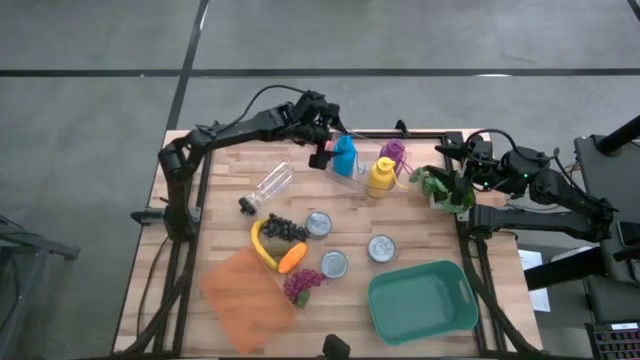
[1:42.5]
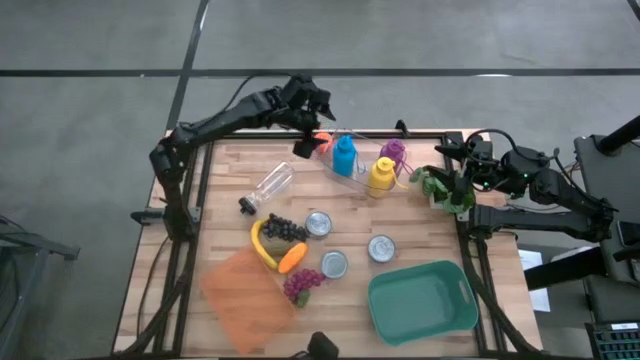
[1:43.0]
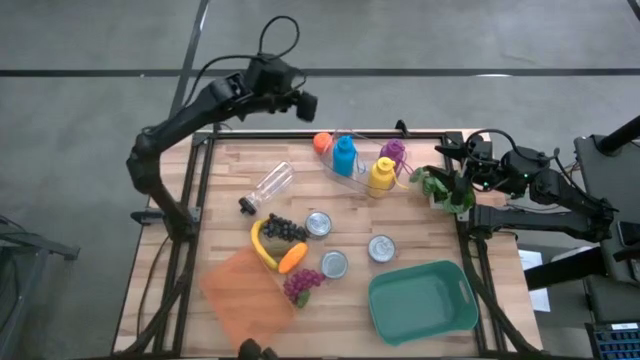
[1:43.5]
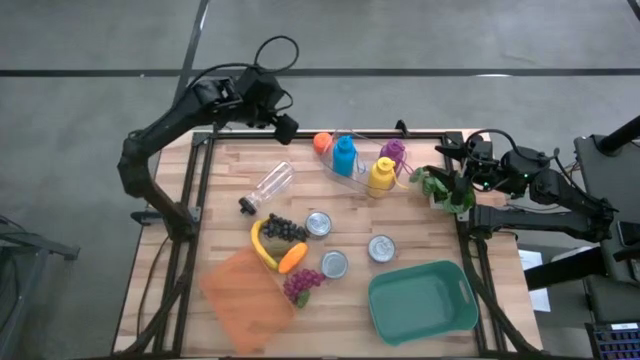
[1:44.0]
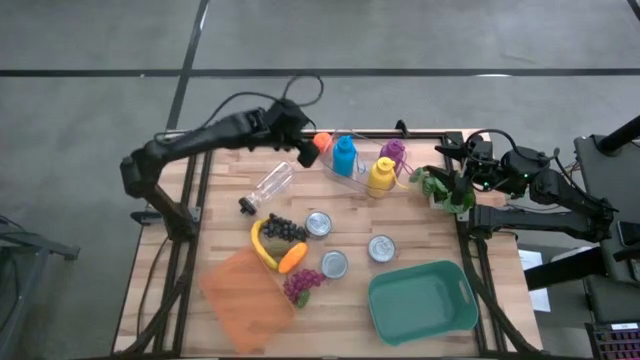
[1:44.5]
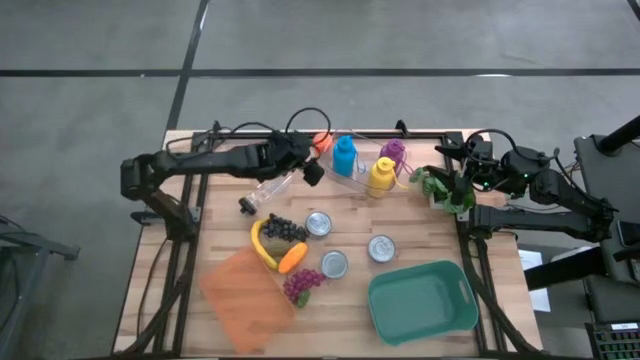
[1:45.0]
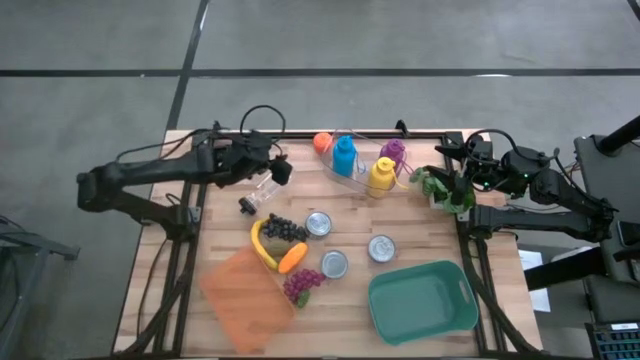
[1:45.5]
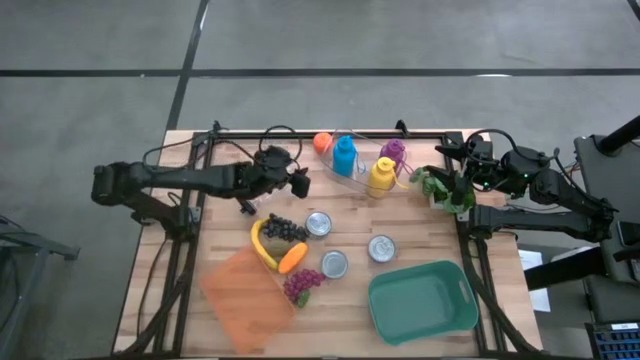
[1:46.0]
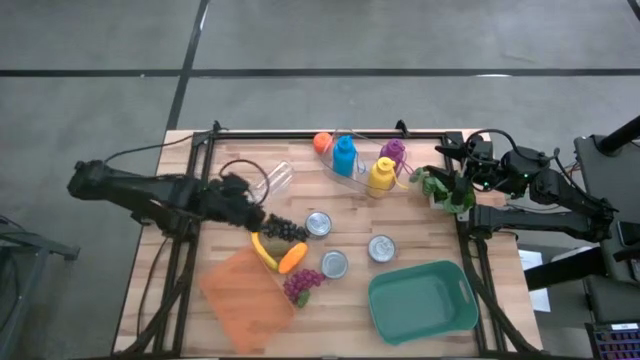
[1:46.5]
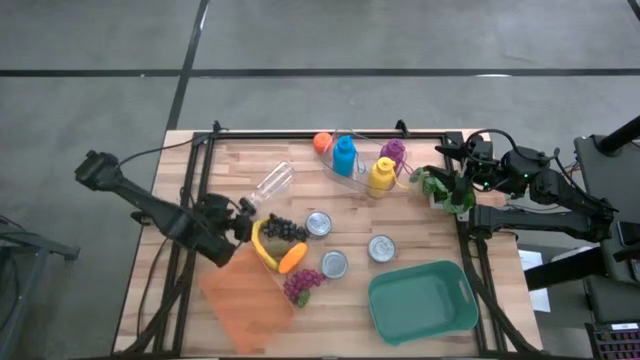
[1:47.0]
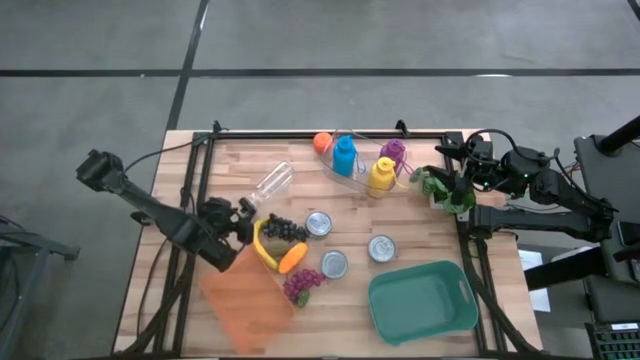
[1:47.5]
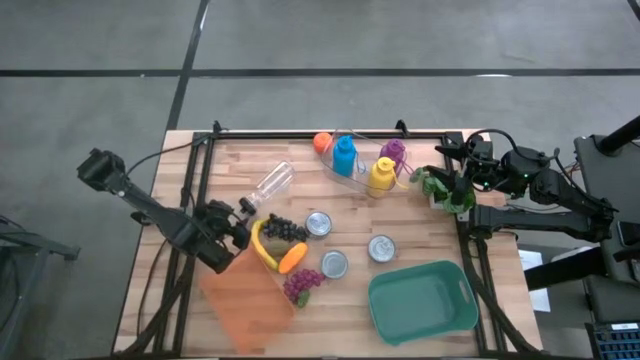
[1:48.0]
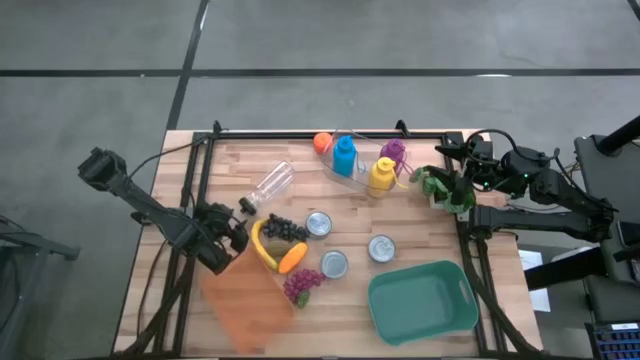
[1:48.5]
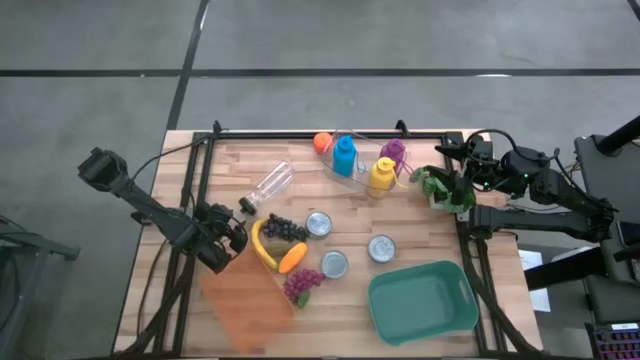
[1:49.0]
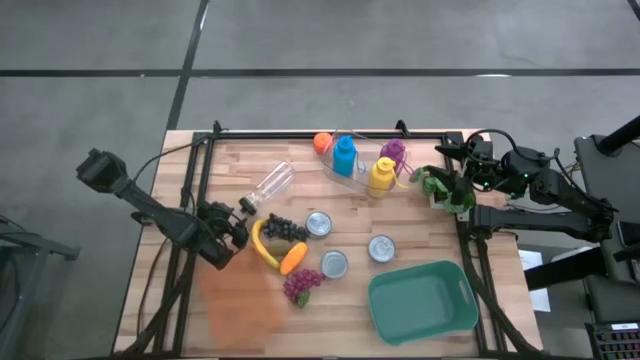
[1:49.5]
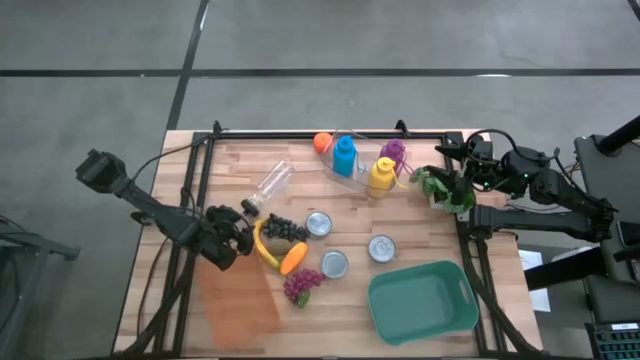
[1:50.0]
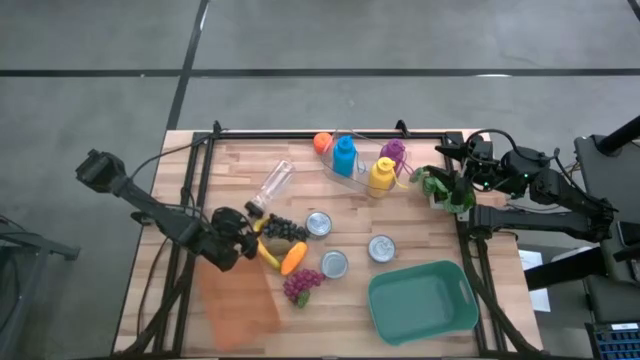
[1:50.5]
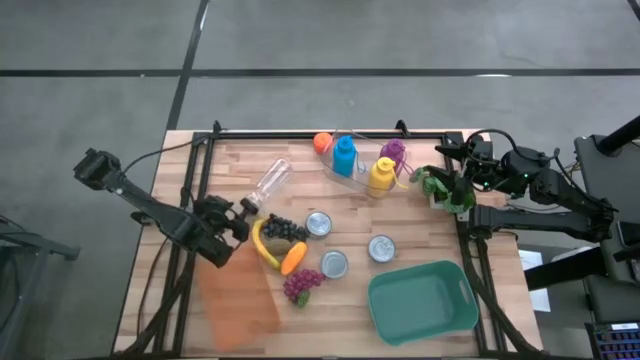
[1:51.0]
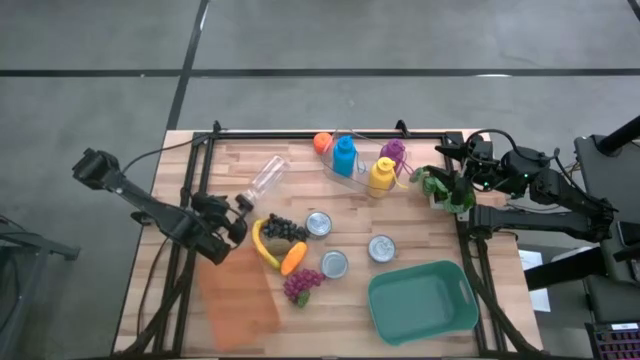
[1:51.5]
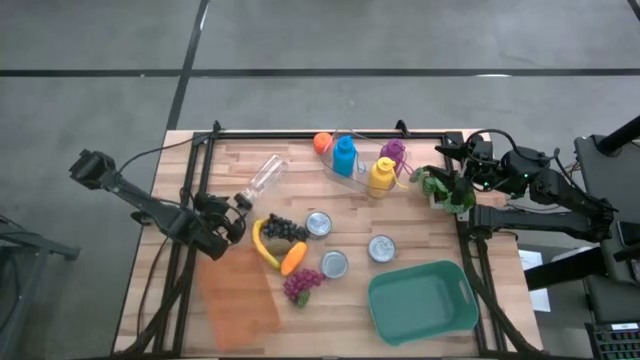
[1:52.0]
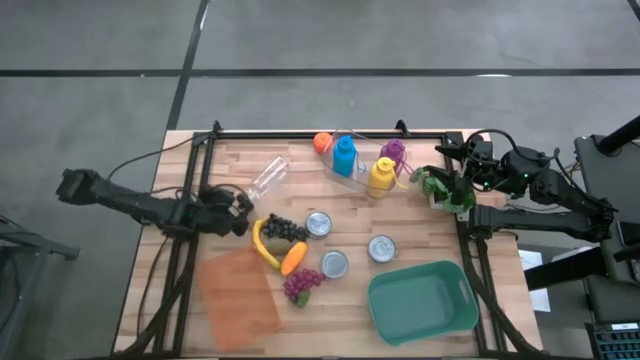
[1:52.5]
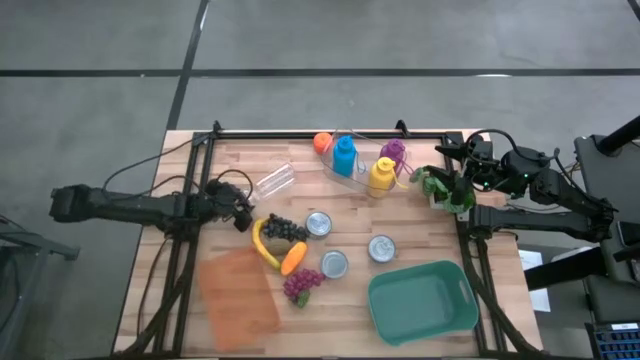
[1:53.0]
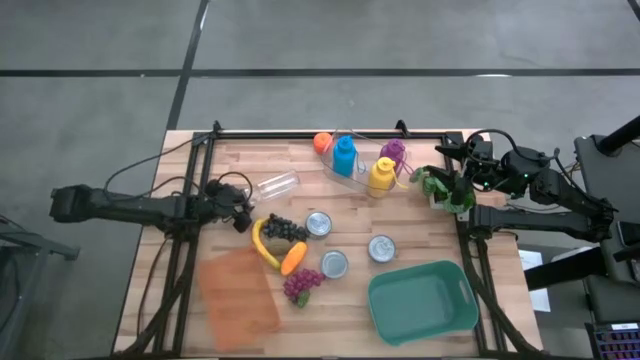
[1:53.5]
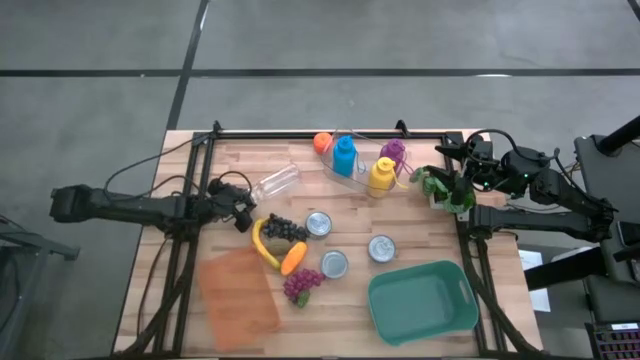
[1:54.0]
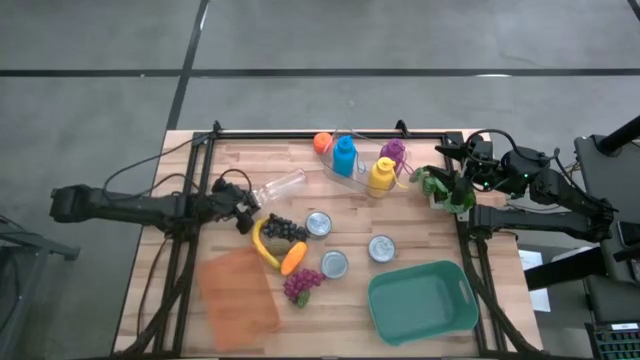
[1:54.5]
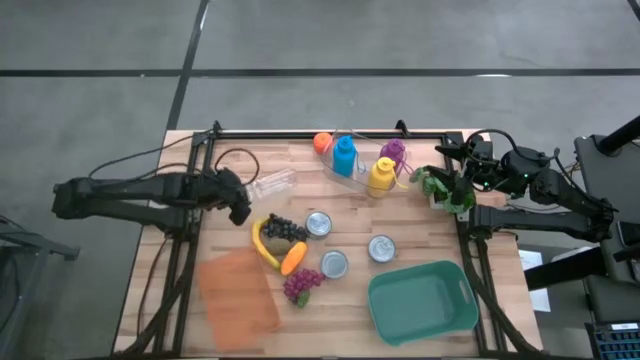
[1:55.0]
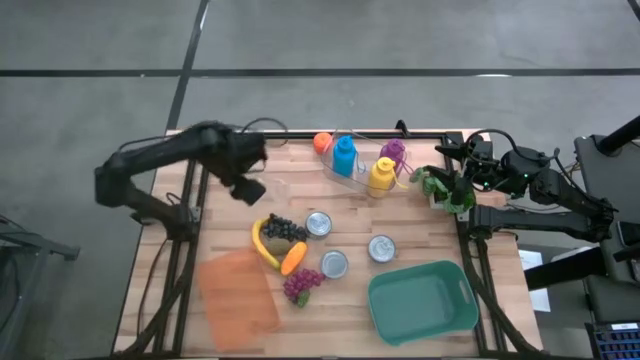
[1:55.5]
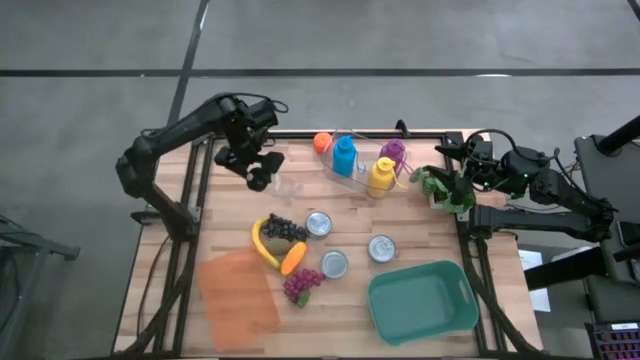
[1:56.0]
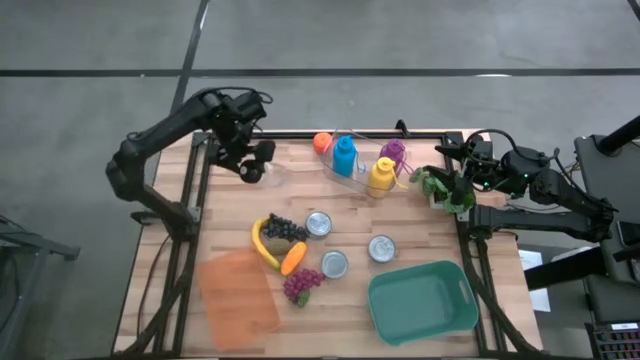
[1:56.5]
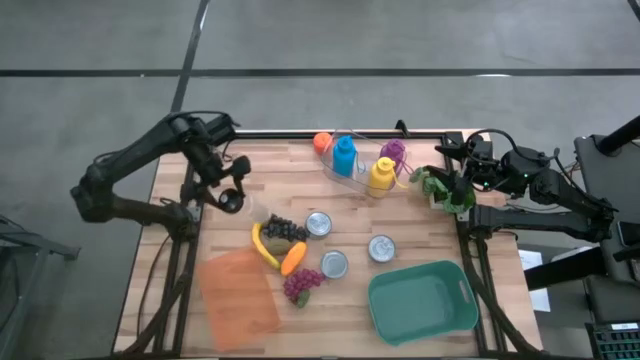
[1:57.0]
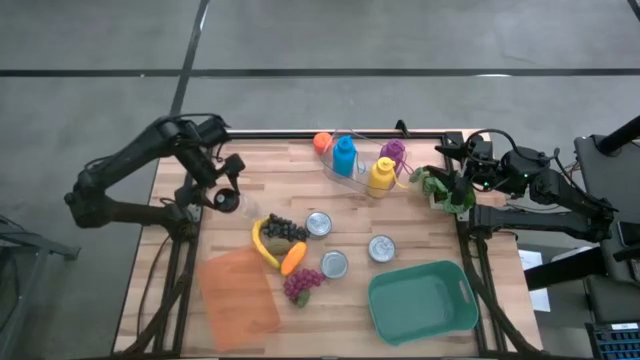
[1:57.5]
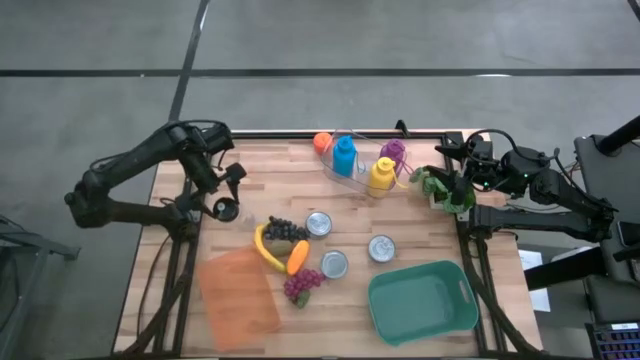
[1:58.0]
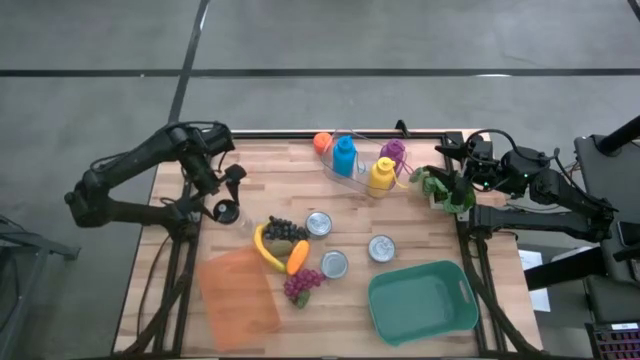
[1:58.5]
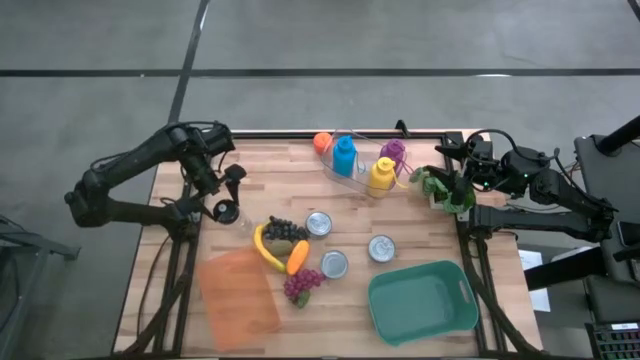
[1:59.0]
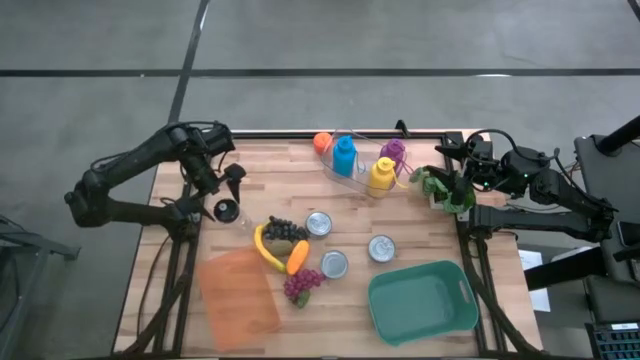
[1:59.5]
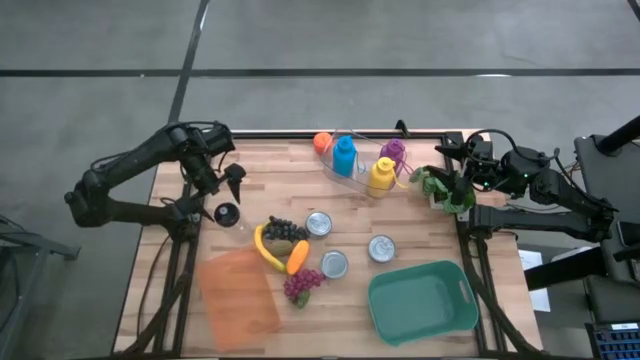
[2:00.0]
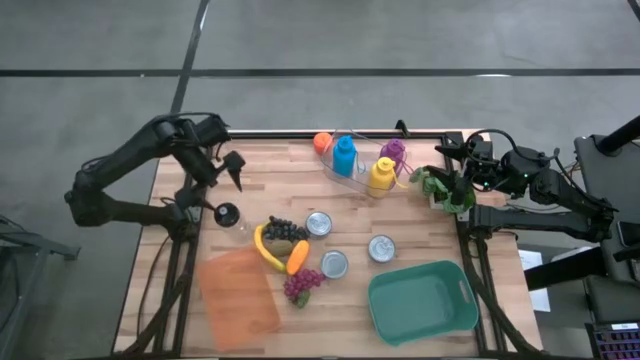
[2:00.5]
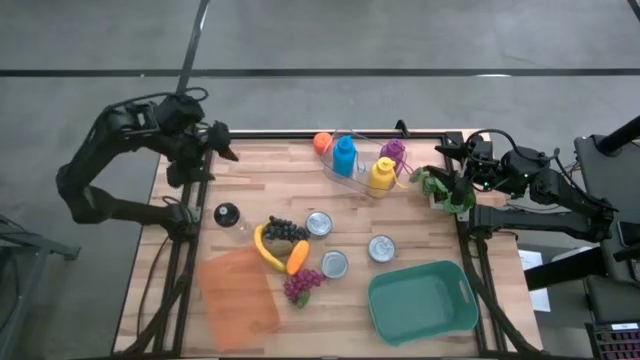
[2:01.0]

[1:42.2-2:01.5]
Task: Pick & Place Food Item
Put the transparent water bottle into the transparent bin

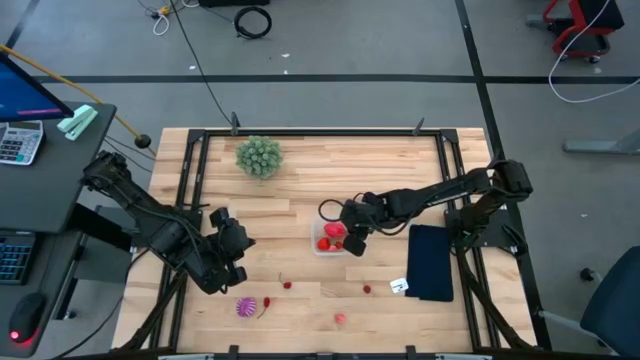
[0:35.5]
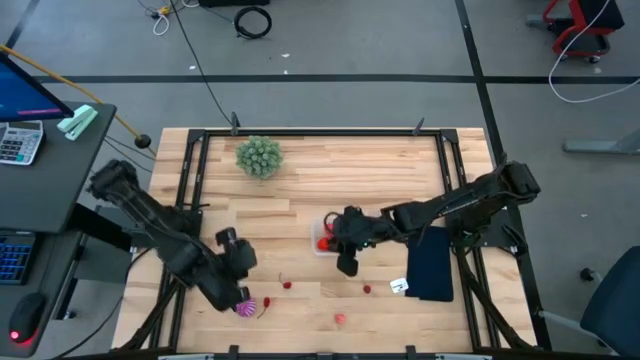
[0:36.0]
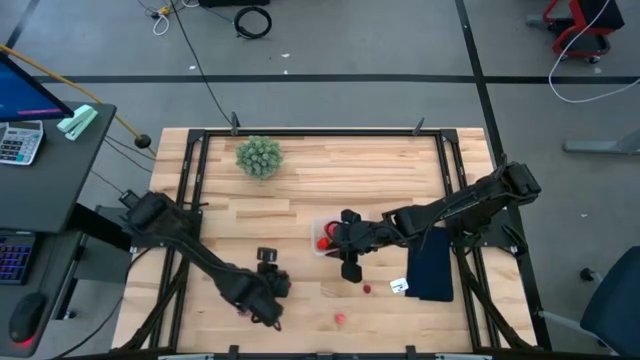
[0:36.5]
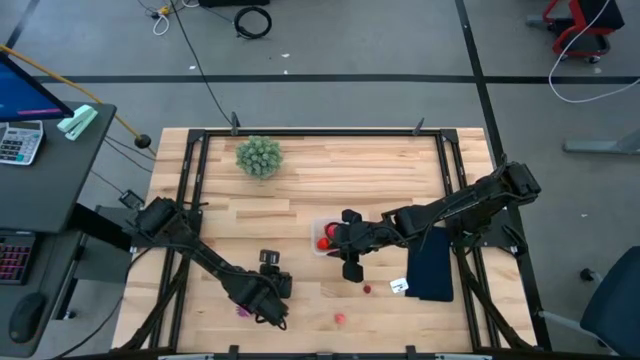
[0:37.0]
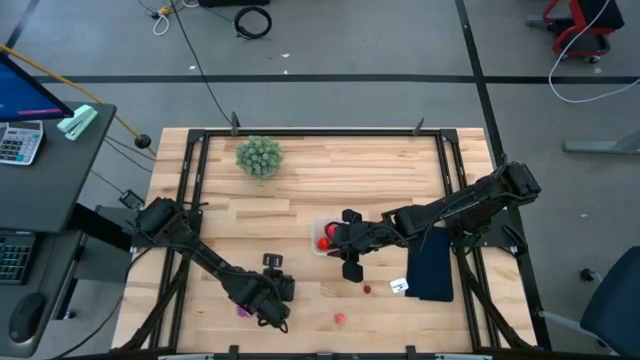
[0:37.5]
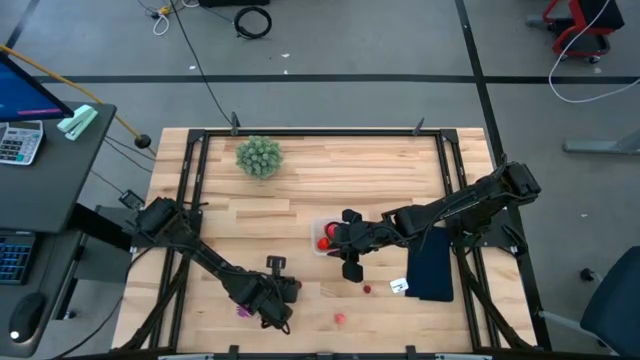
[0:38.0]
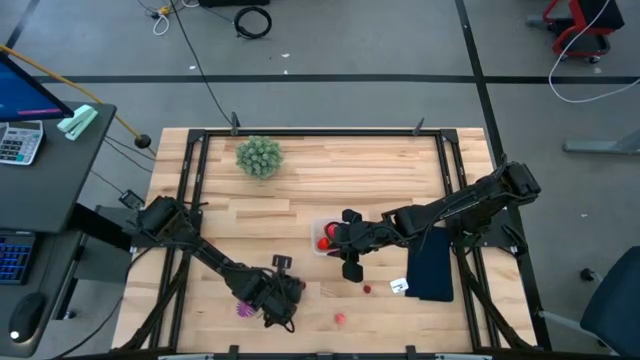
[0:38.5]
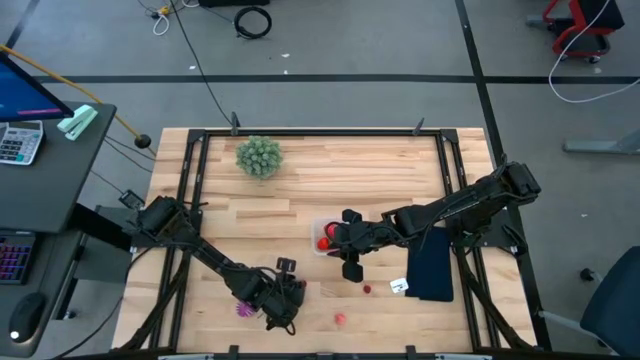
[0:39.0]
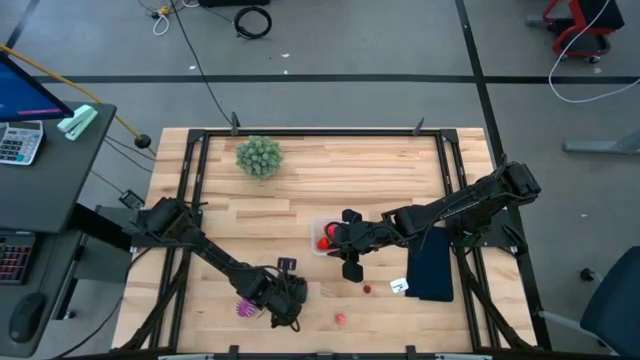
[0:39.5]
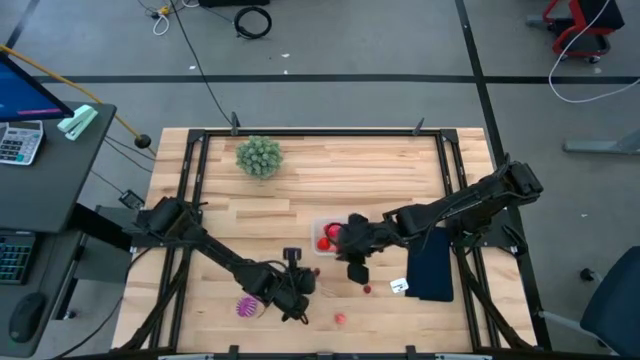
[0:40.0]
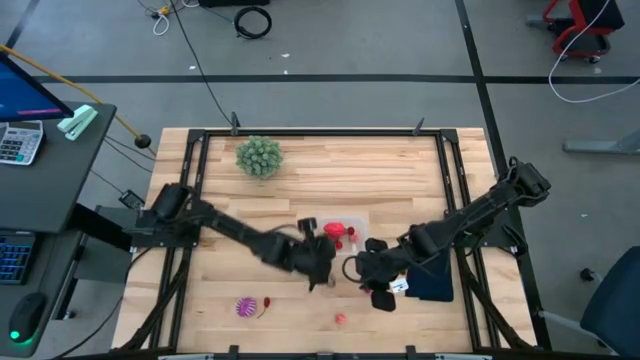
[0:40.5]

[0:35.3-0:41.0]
Task: Pick and placing Produce into tupperware
Put the red cherry into the transparent bin
